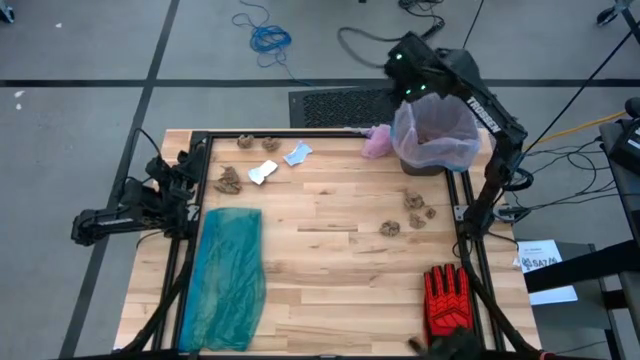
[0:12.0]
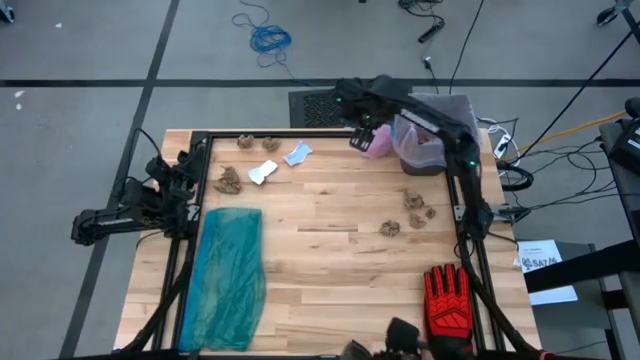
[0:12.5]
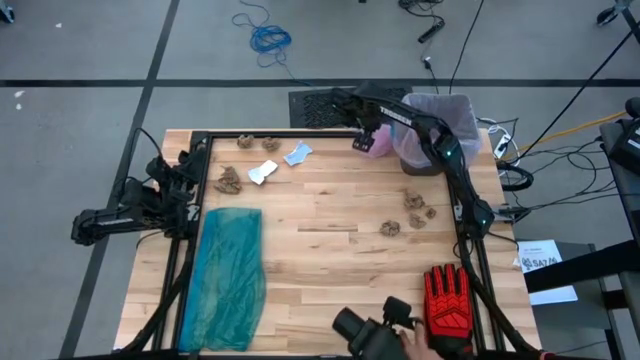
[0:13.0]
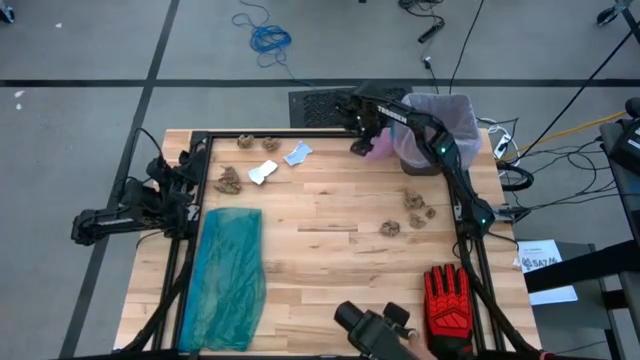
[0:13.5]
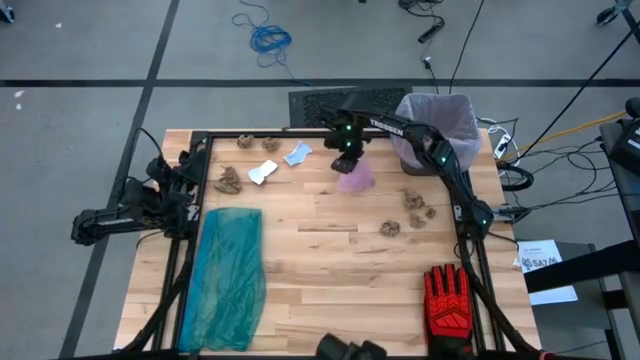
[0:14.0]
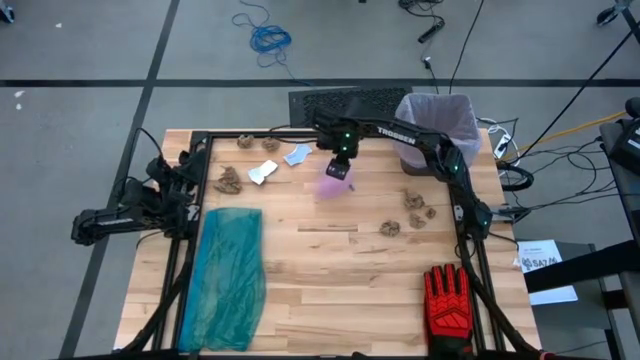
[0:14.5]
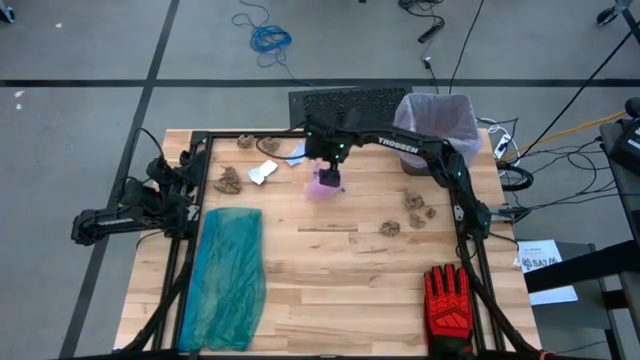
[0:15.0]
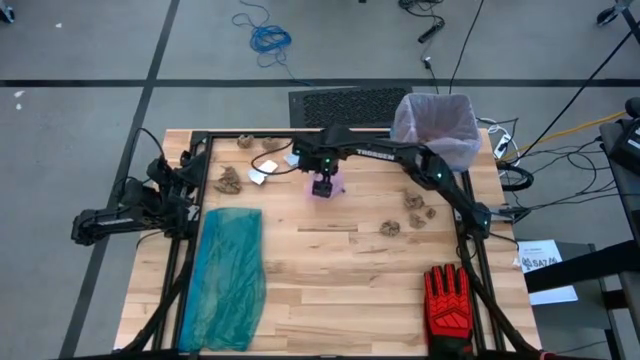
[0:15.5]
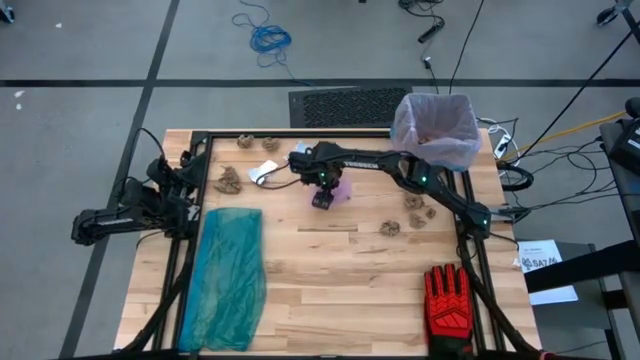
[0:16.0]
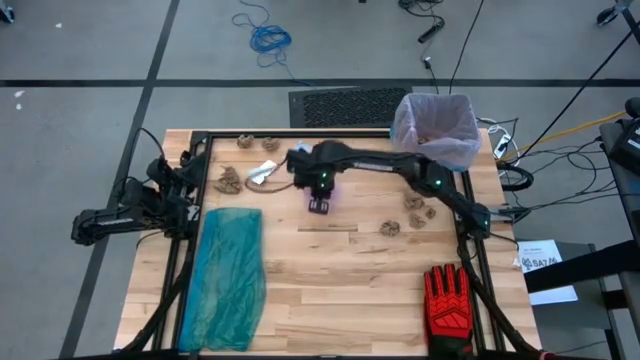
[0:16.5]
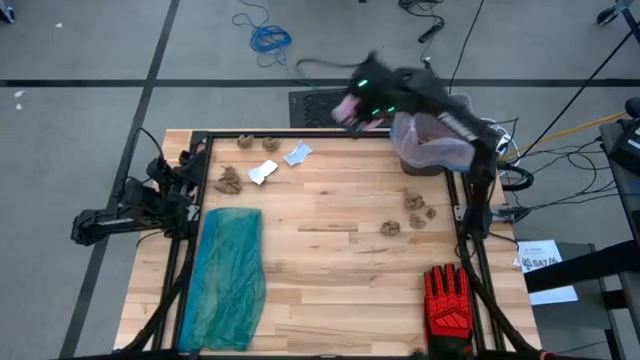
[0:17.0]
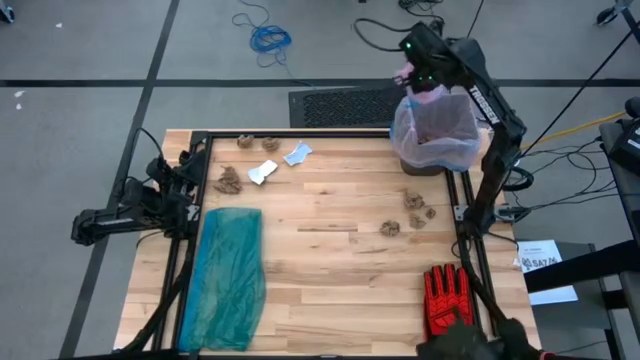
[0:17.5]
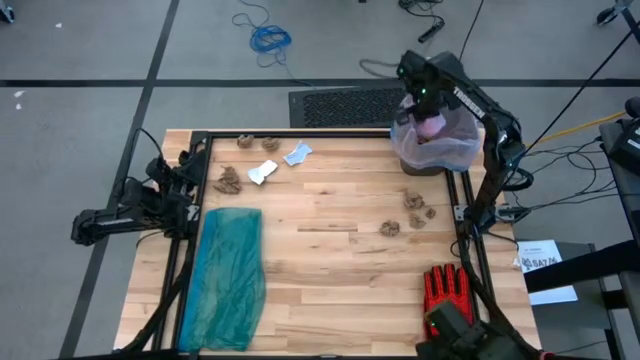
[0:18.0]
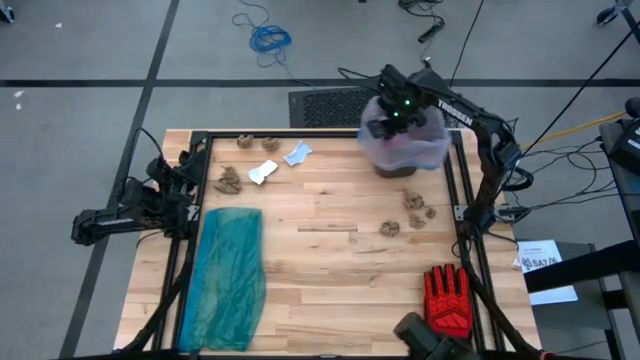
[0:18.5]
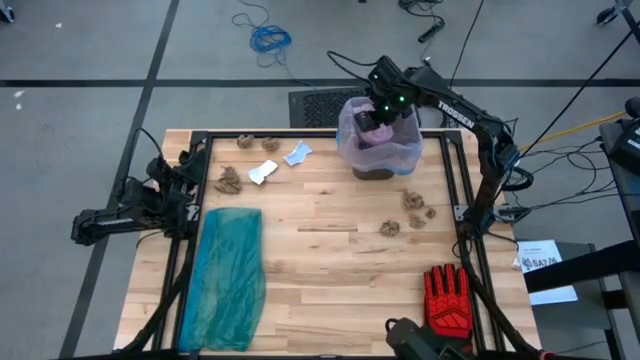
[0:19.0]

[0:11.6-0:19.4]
Task: place trash/remove bag and relplace
Put the pink trash bag into the trash bin

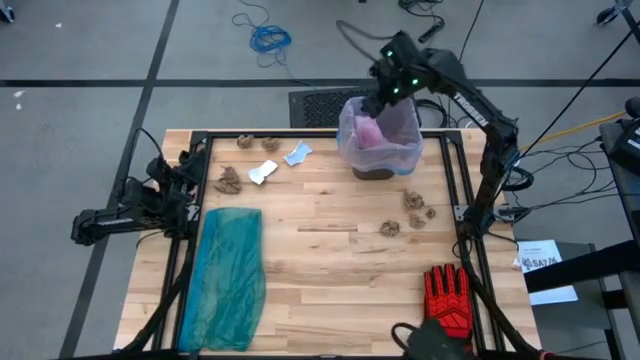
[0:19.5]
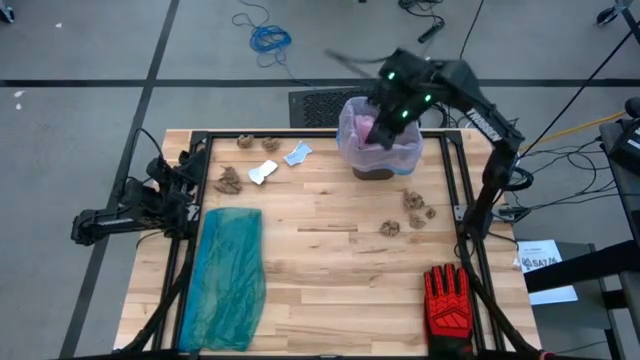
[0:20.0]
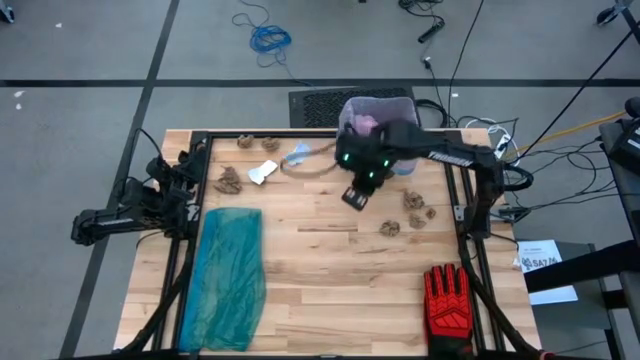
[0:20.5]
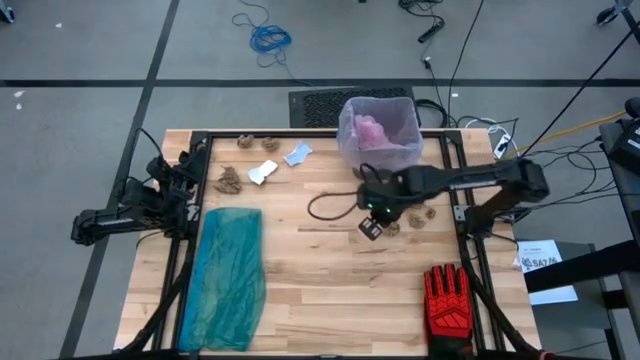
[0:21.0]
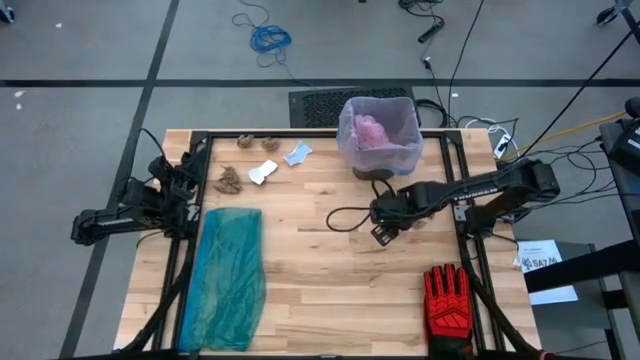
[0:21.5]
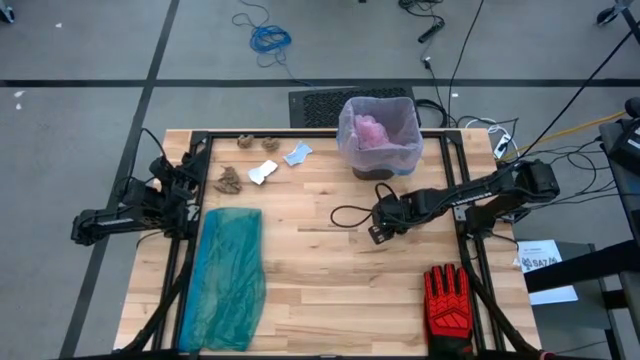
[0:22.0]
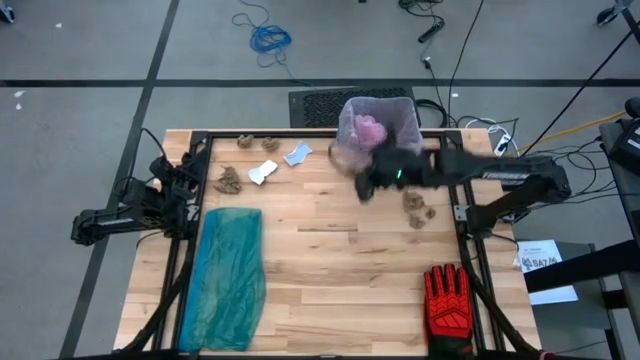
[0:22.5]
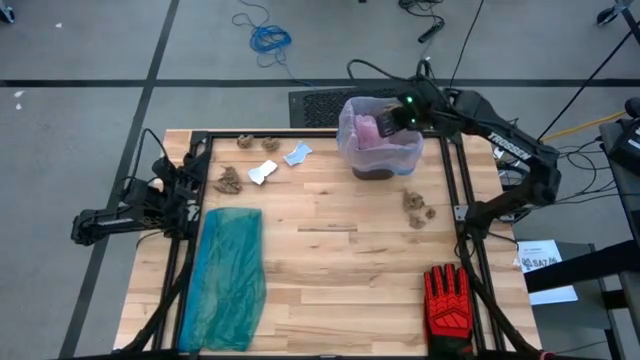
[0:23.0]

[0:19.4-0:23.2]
Put the brown napkin into the trash bin

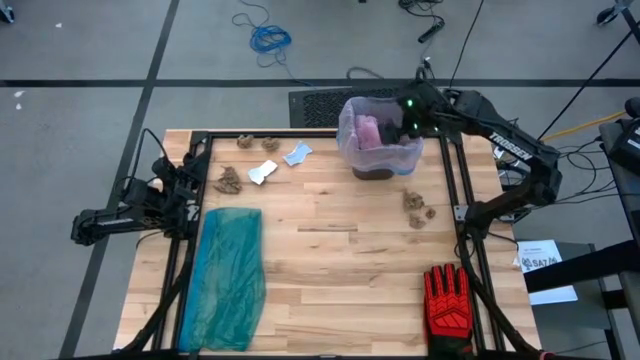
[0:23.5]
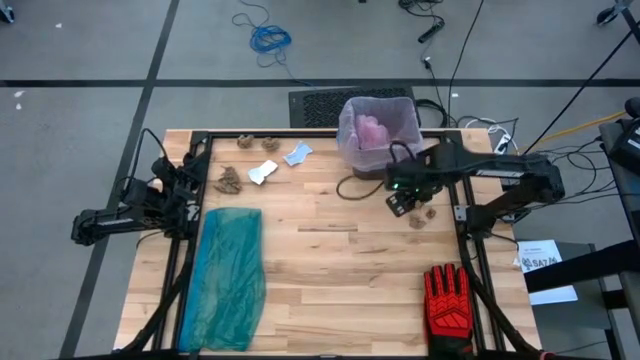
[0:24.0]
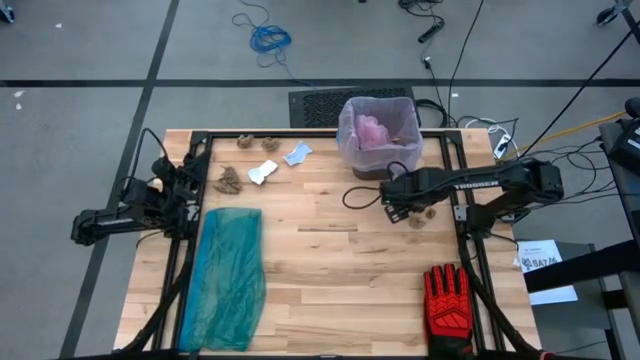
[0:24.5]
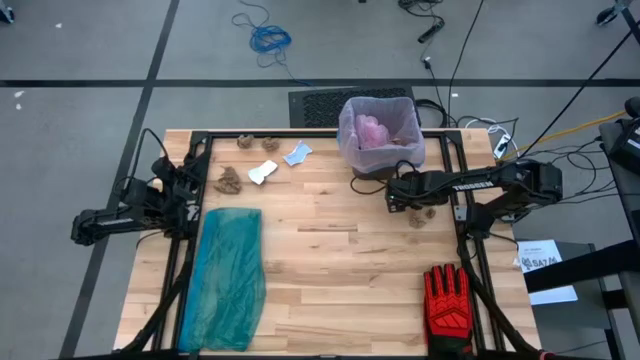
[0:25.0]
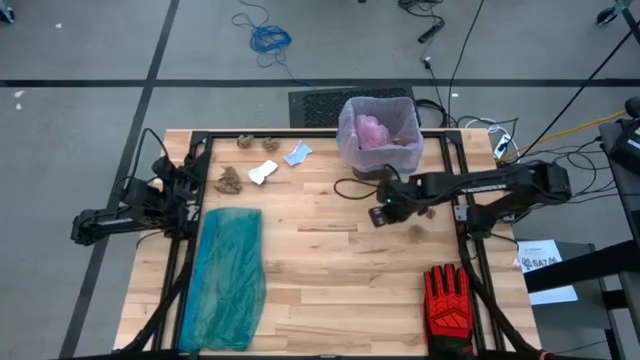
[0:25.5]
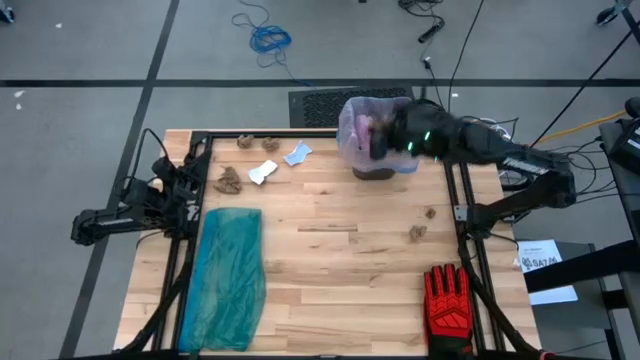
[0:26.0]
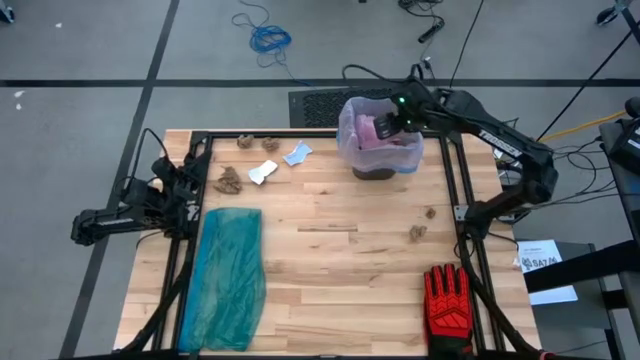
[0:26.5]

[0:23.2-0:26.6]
Put the brown napkin into the trash bin

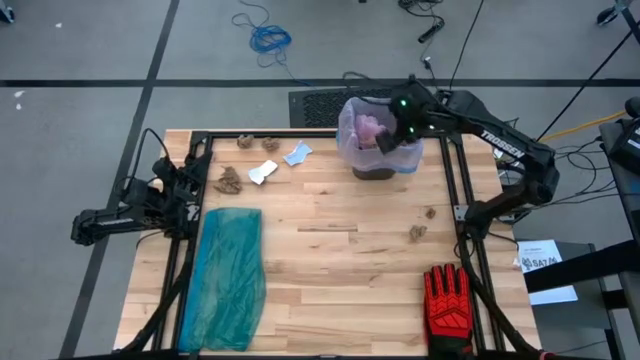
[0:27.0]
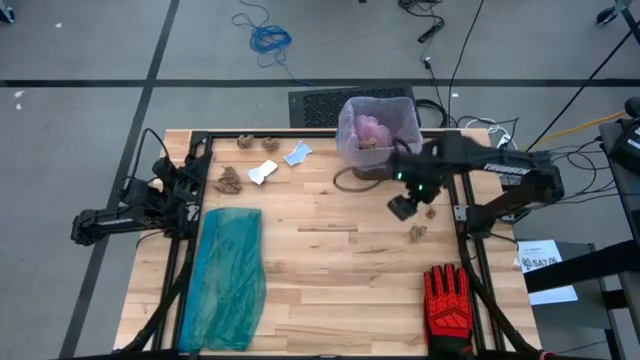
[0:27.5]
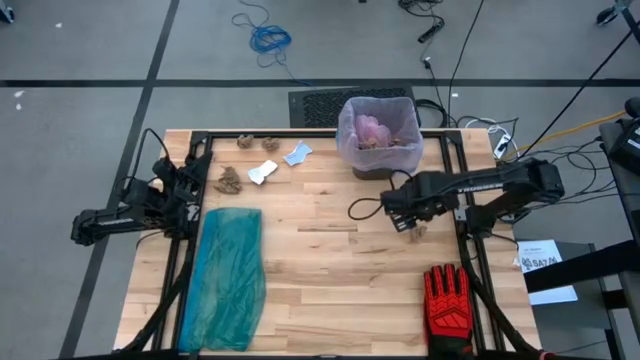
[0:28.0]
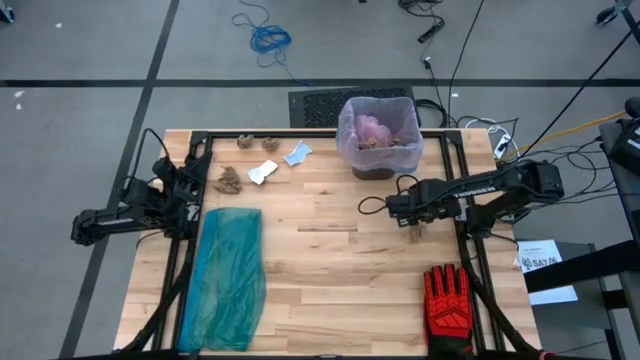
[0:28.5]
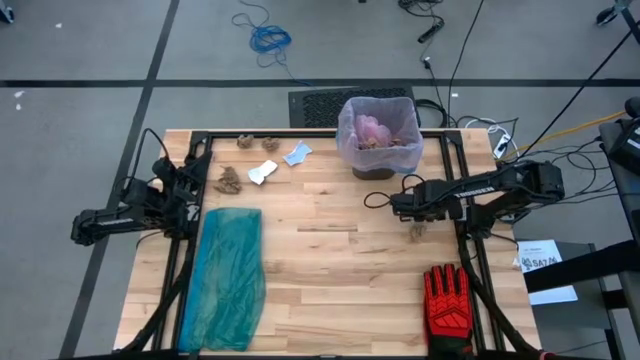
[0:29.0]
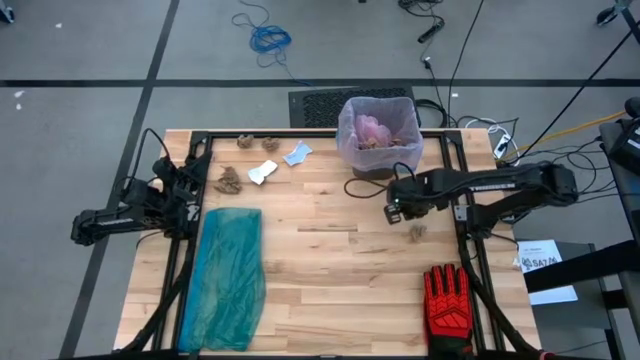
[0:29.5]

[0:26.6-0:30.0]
Put the brown napkin into the trash bin

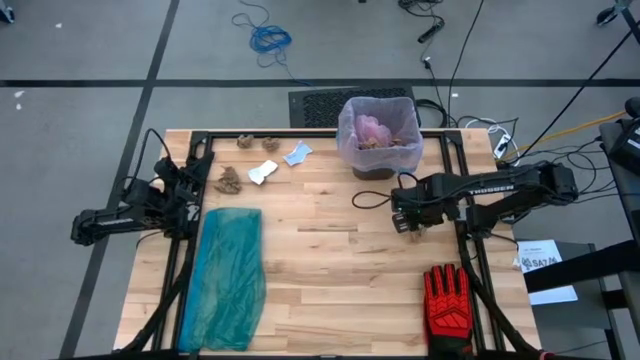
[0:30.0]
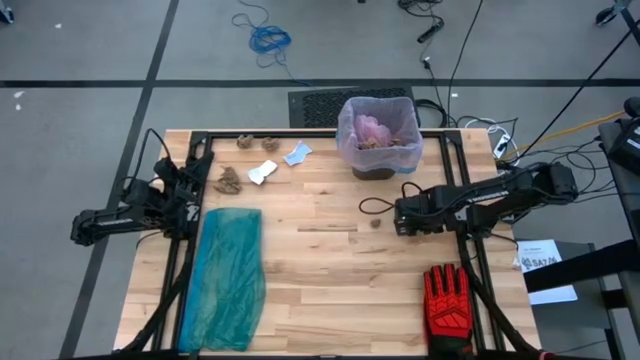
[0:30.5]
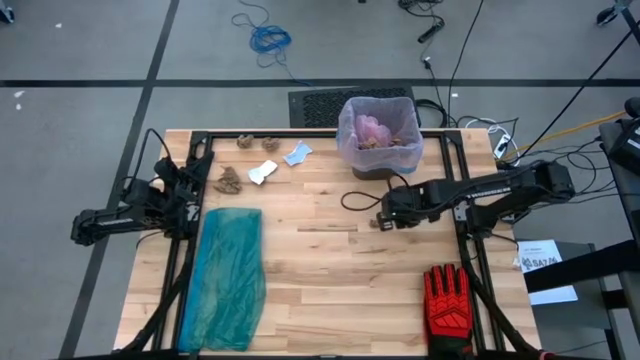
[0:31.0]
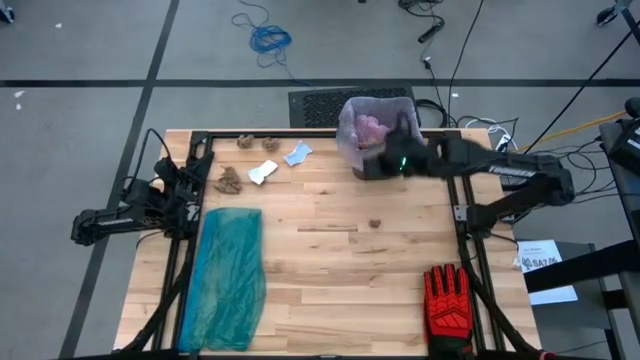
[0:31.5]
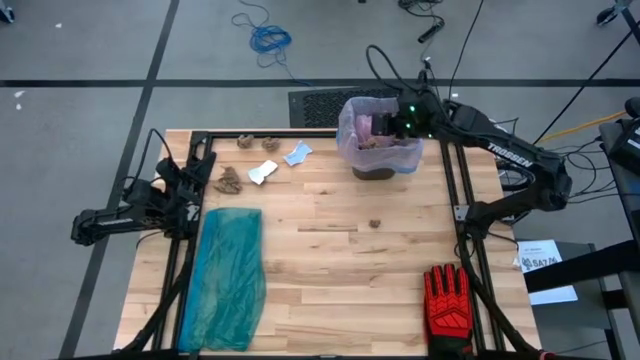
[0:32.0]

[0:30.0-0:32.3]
Put the brown napkin into the trash bin
